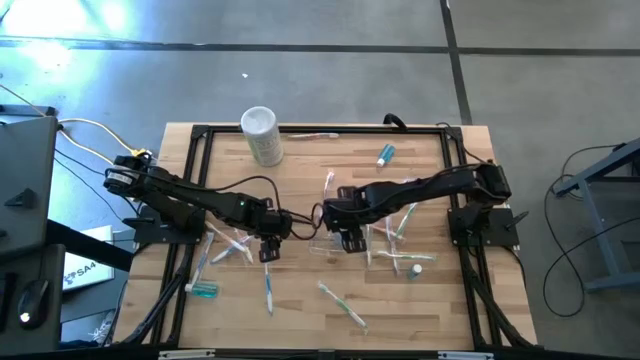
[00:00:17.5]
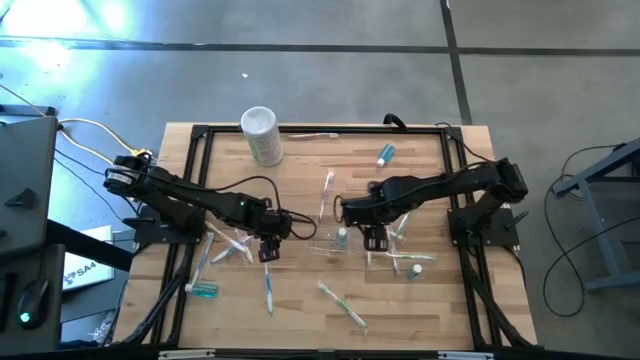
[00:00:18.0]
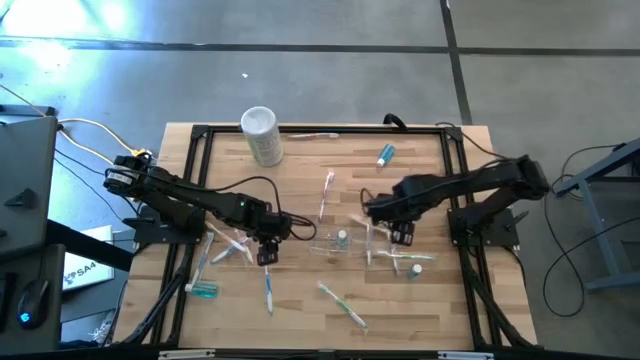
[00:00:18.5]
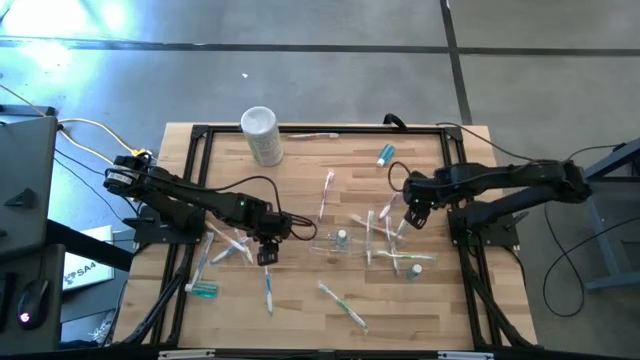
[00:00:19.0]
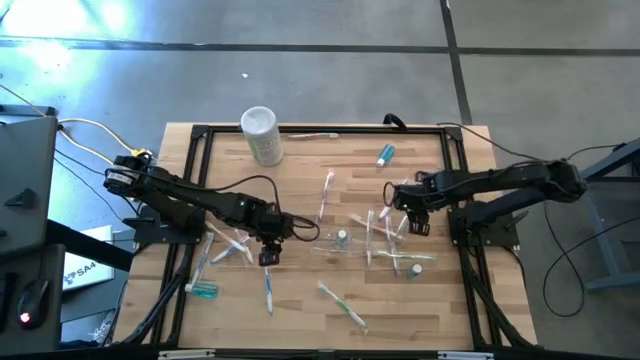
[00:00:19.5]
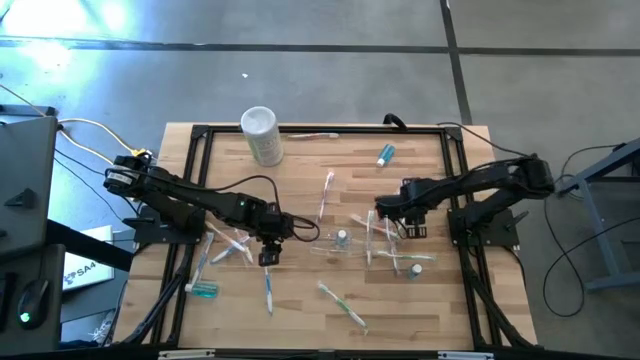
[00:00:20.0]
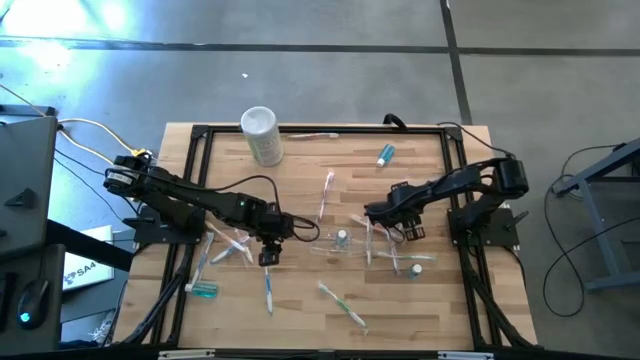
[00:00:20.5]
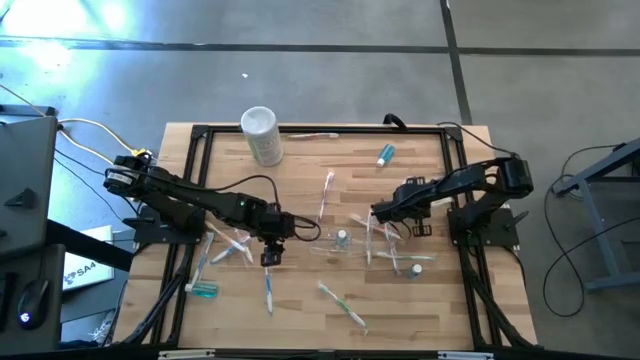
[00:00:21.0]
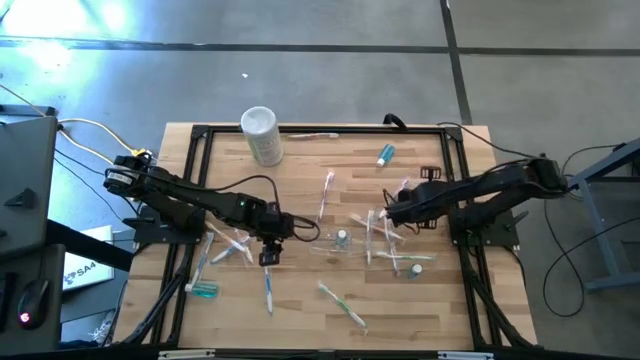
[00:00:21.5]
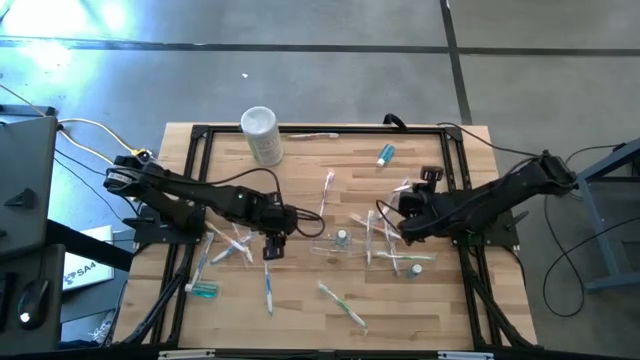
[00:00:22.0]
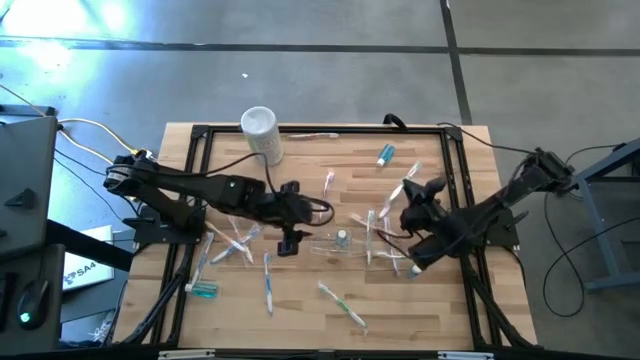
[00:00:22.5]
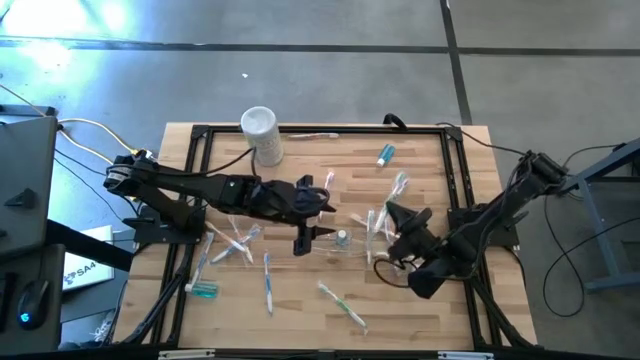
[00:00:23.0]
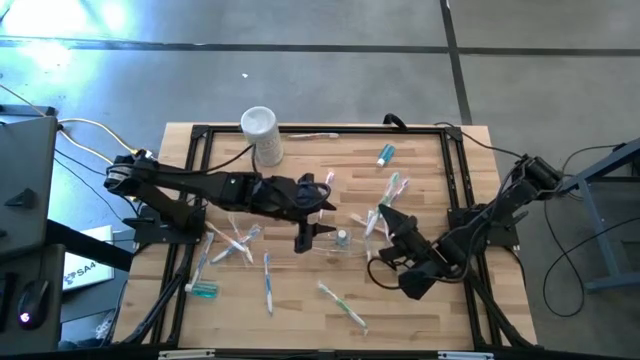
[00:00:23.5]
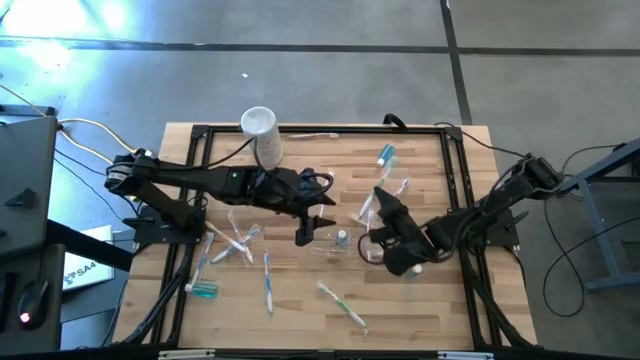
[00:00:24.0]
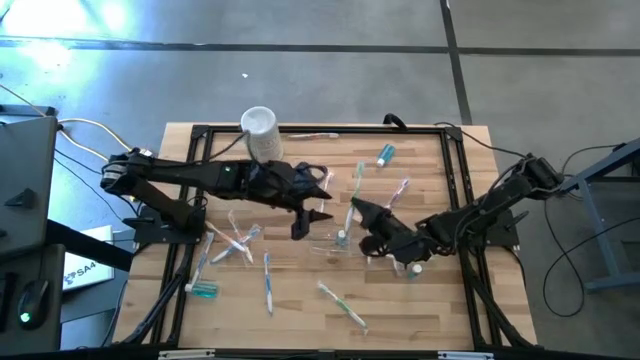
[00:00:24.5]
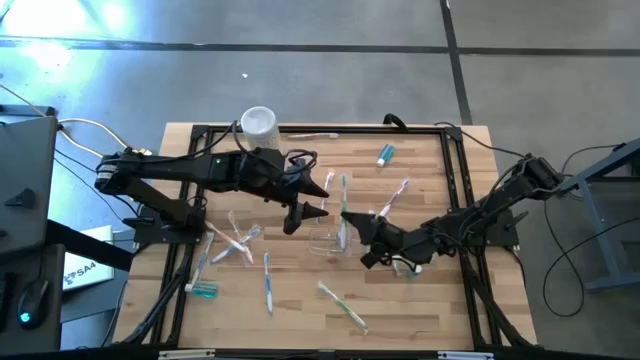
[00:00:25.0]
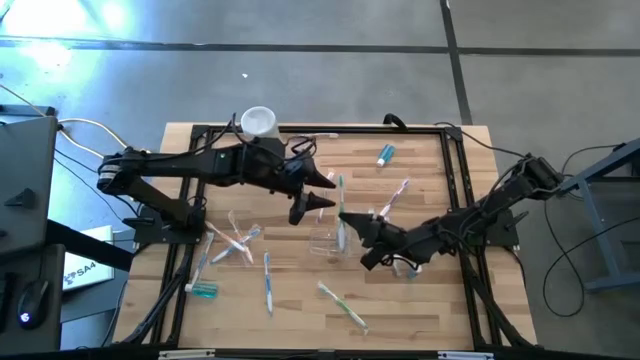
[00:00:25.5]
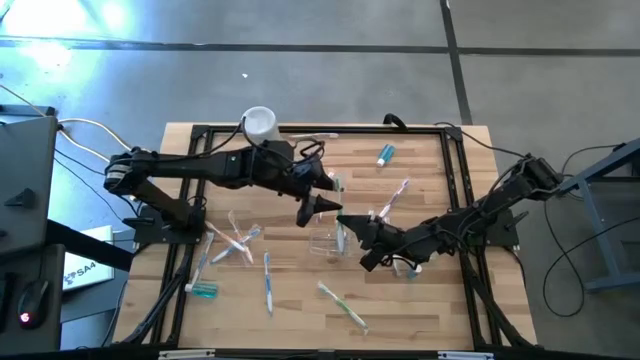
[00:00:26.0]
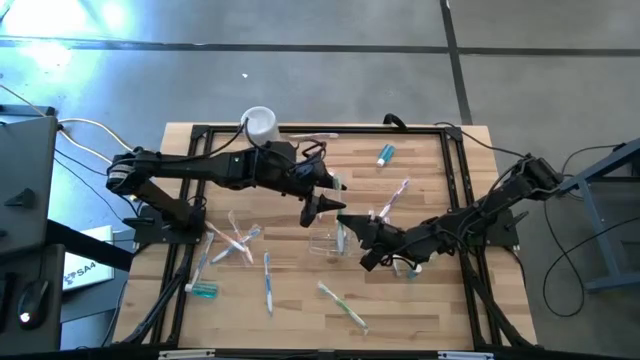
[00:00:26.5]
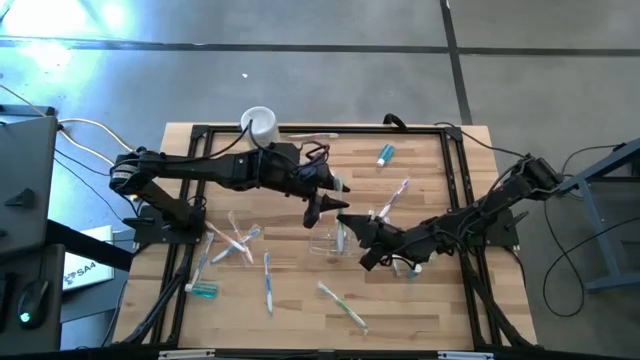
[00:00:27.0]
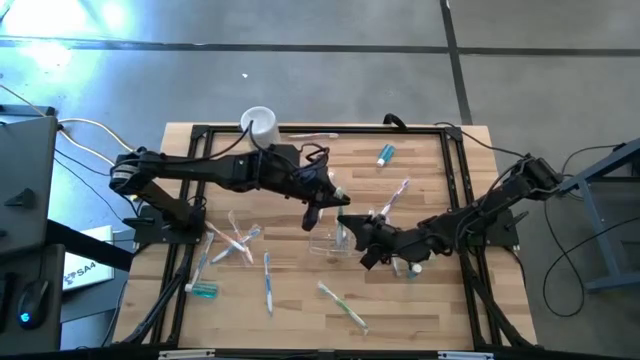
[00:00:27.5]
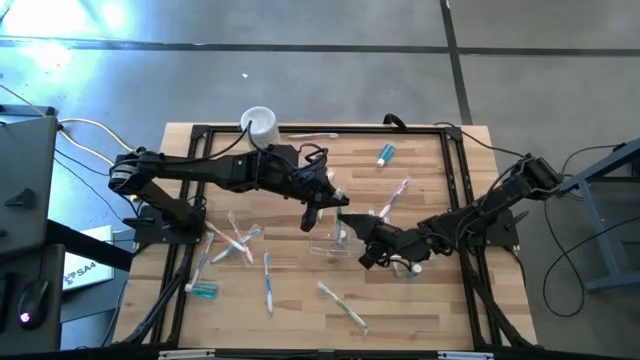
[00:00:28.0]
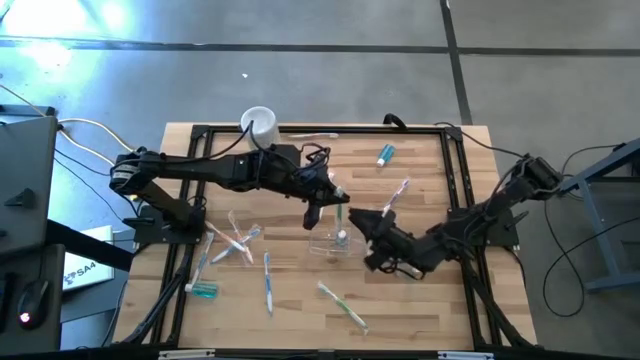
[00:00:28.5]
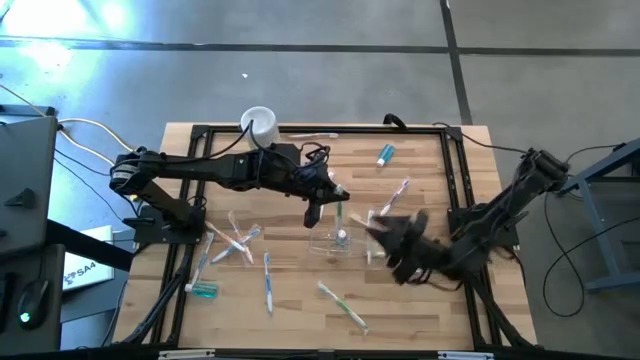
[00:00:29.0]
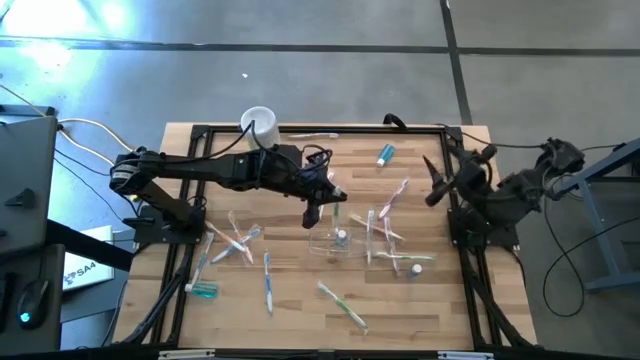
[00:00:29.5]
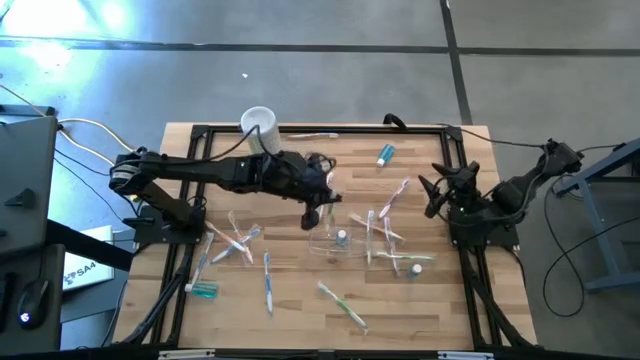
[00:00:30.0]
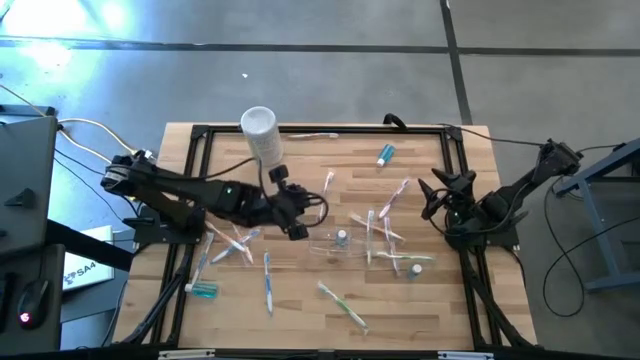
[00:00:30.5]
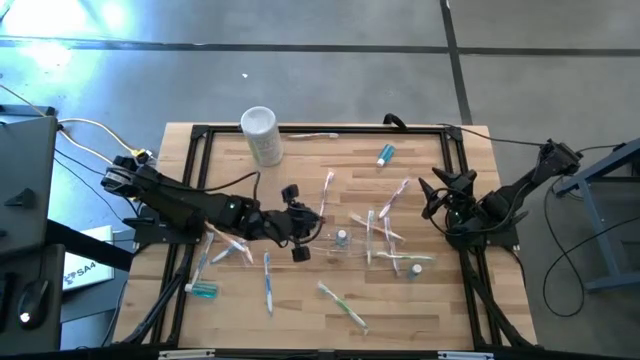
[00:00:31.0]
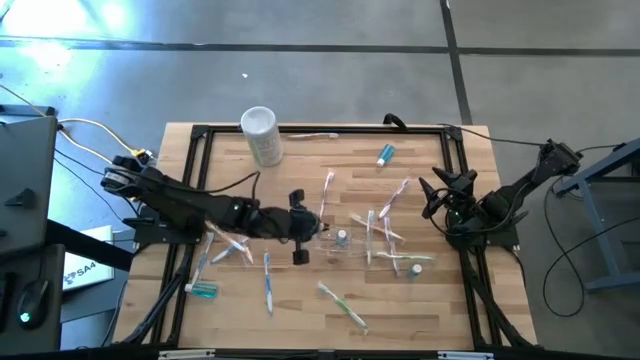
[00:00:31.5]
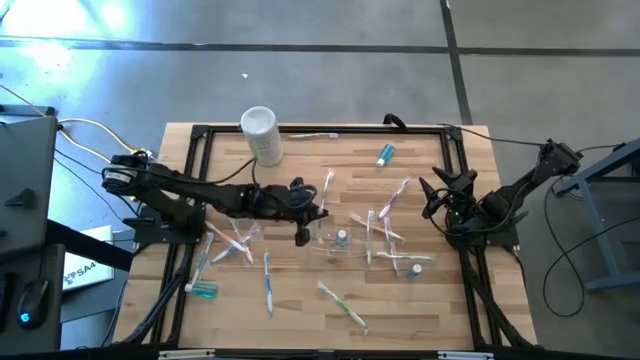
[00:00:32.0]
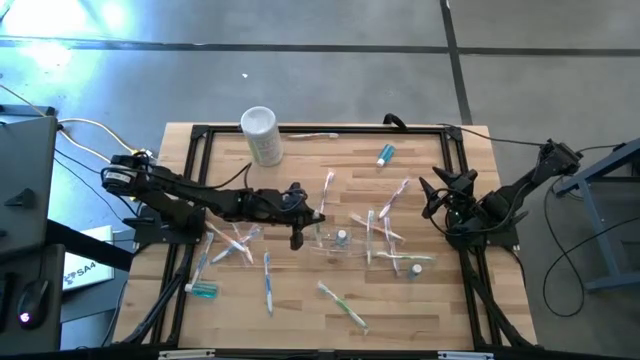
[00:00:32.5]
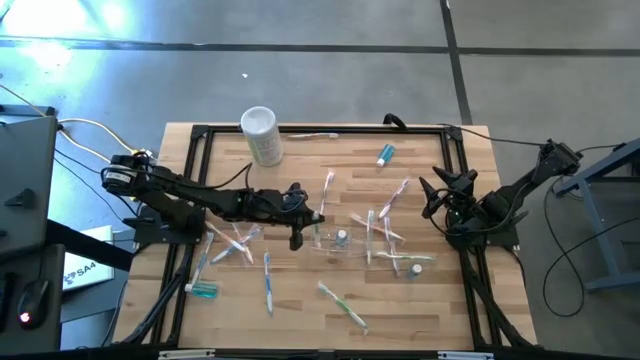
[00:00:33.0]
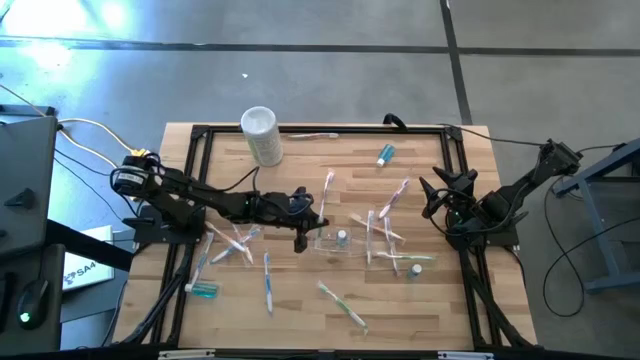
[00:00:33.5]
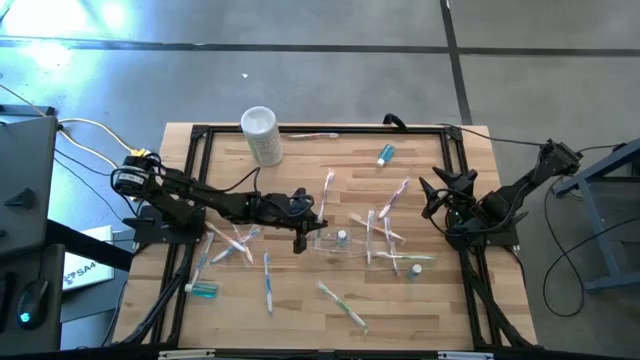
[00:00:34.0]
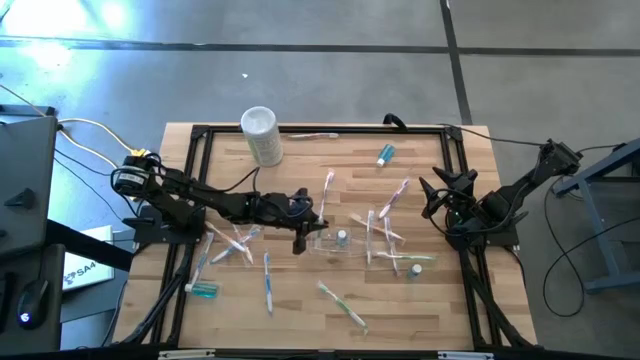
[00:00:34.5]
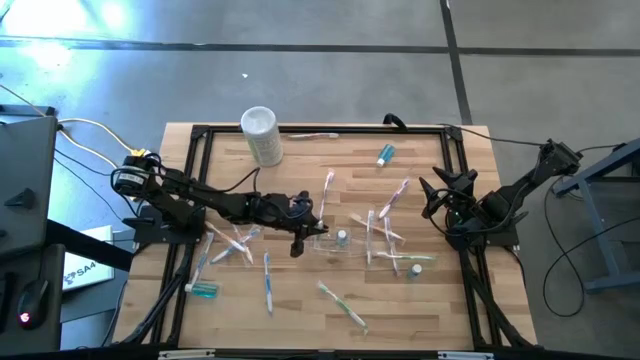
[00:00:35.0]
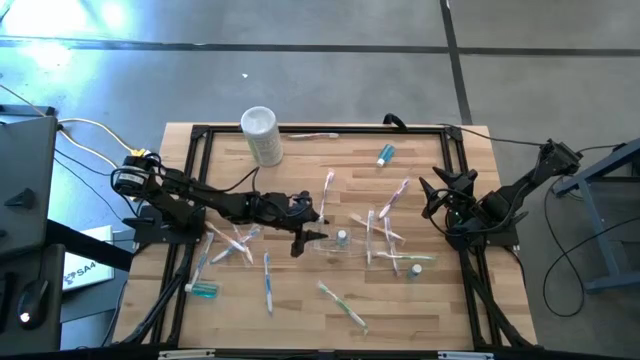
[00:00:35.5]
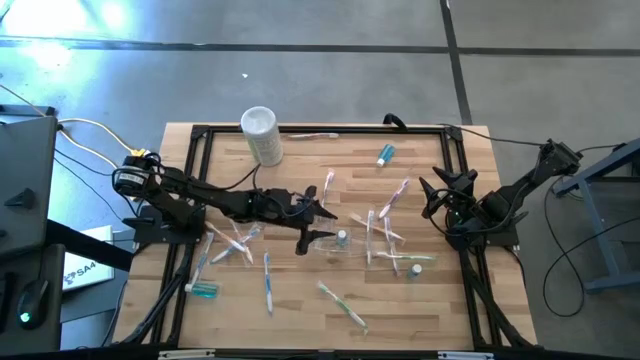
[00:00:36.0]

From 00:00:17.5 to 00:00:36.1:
Task: Pick & Place toothbrushing station
Put the green toothbrush into the left section of the transparent organizer

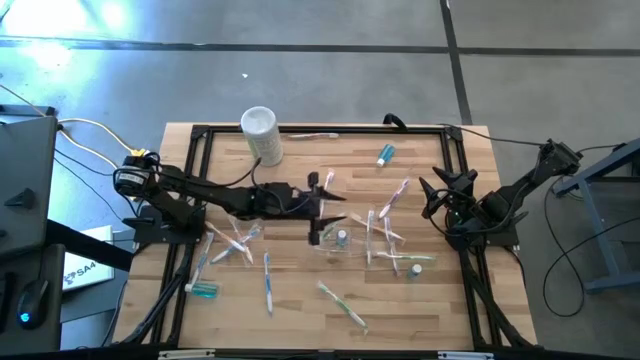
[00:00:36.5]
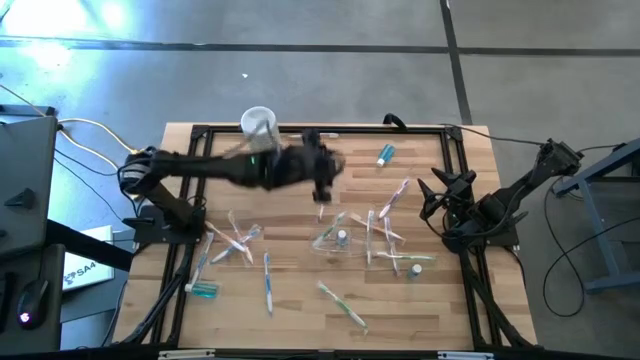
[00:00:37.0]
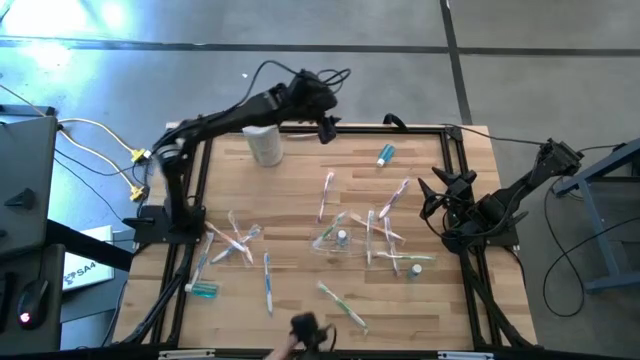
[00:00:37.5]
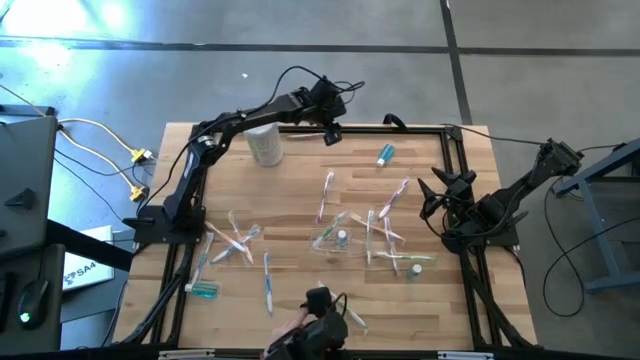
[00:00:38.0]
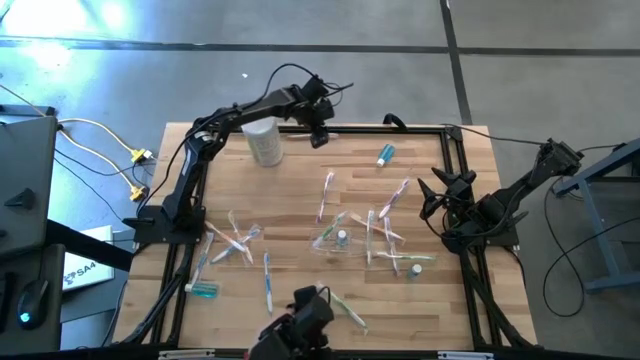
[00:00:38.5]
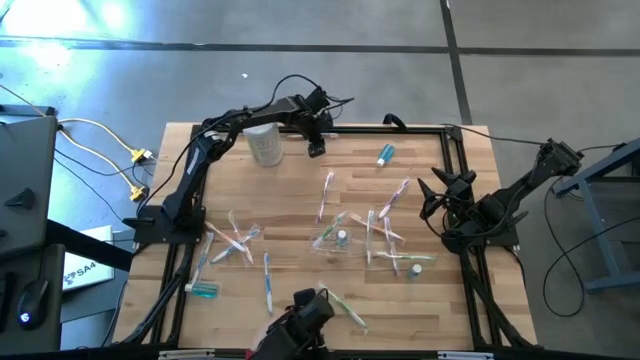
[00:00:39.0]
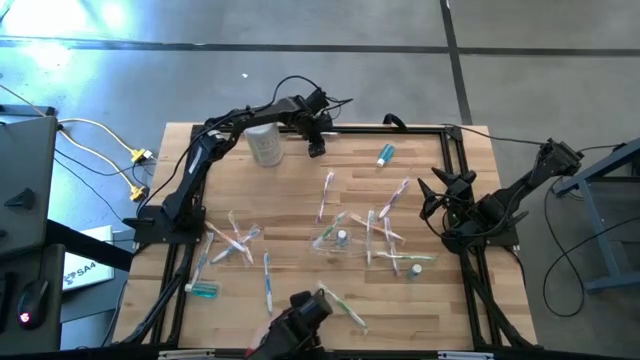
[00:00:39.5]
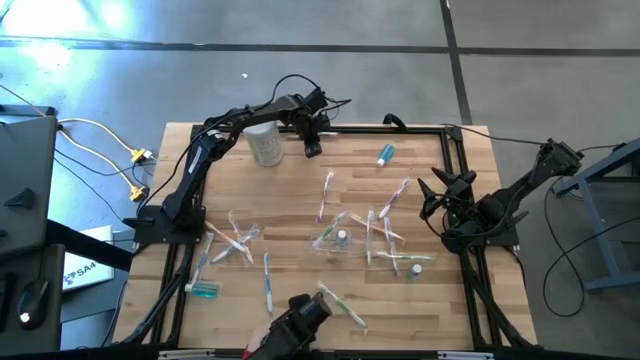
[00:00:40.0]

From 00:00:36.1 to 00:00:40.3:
Put the orange toothbrush into the right section of the transparent organizer
